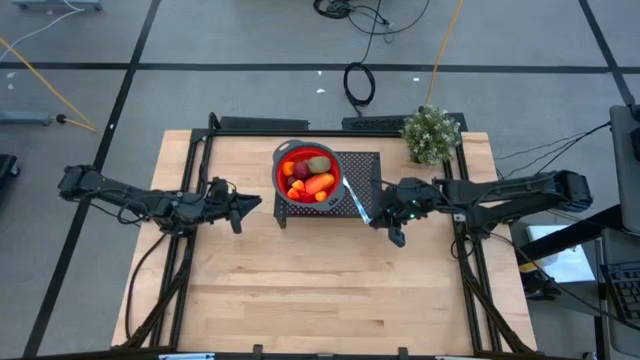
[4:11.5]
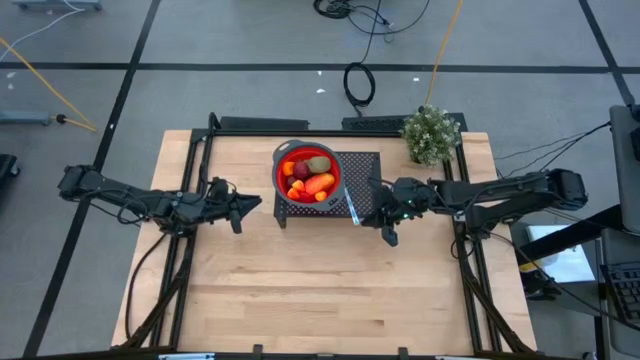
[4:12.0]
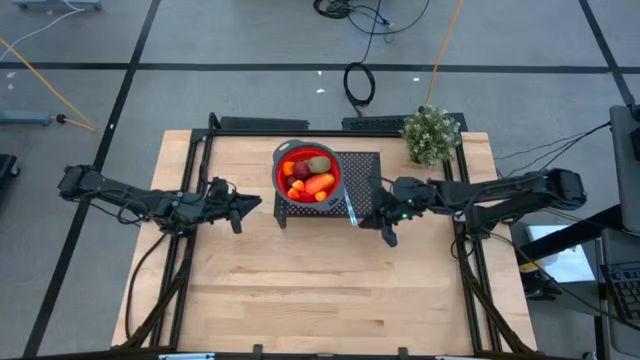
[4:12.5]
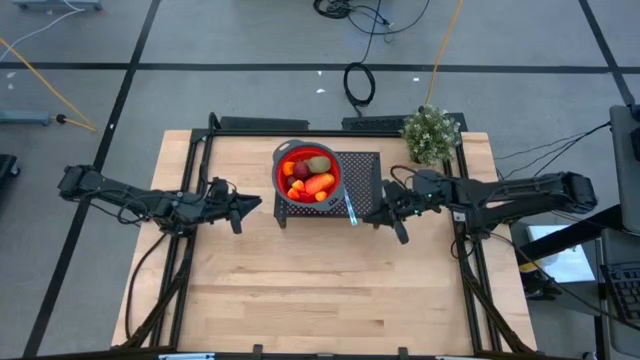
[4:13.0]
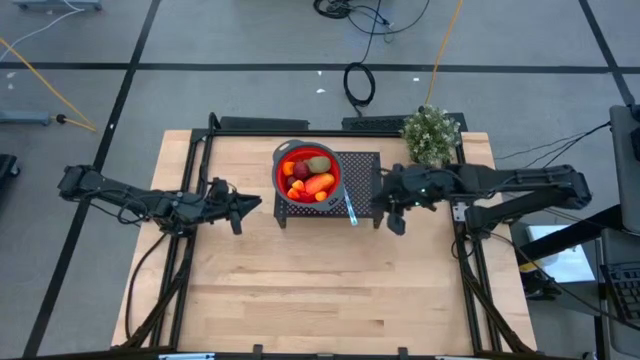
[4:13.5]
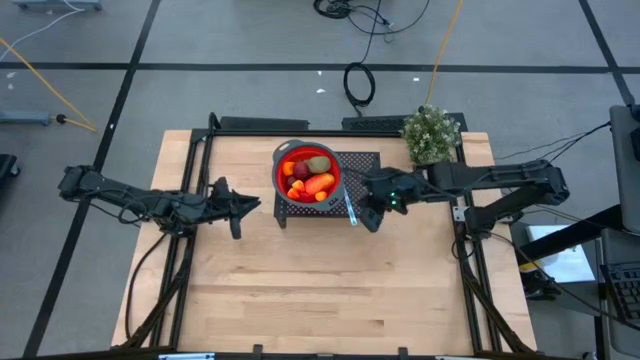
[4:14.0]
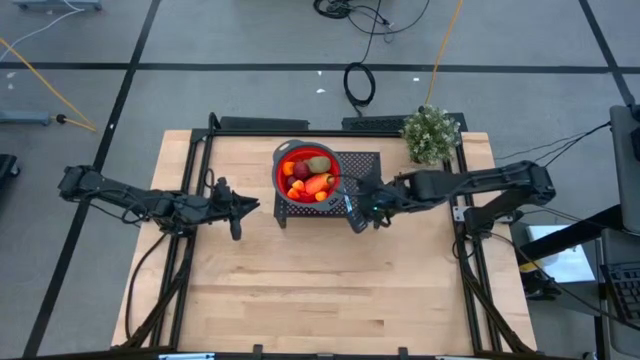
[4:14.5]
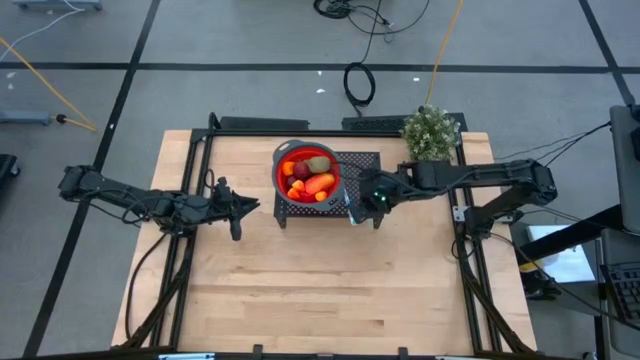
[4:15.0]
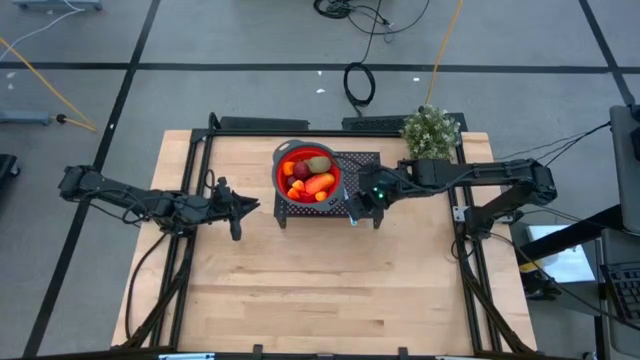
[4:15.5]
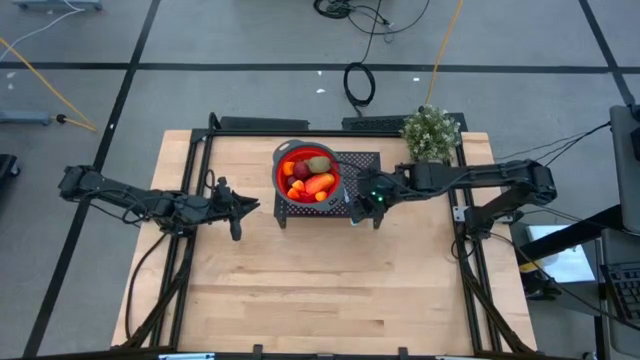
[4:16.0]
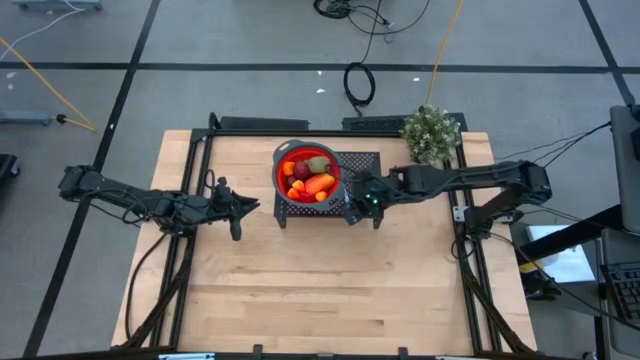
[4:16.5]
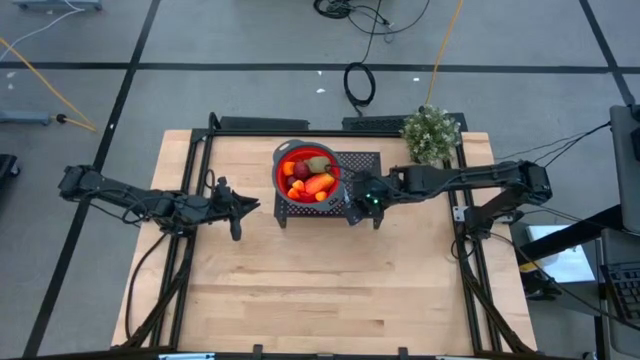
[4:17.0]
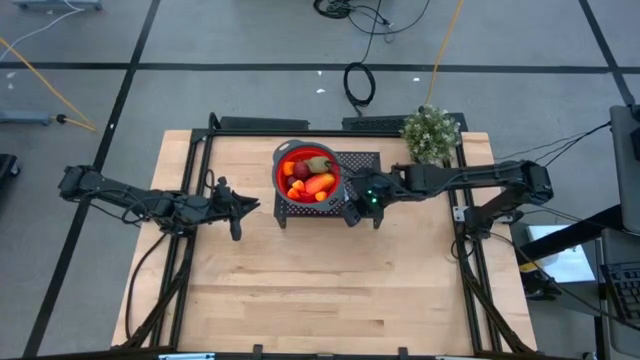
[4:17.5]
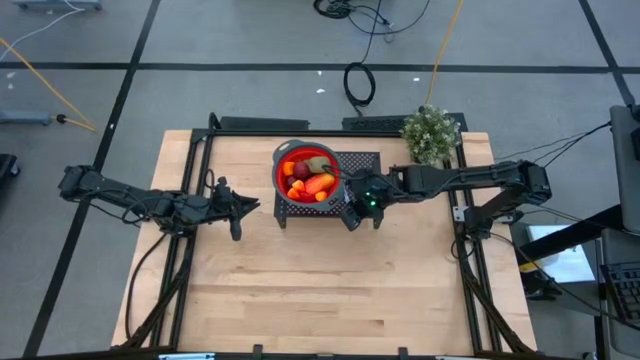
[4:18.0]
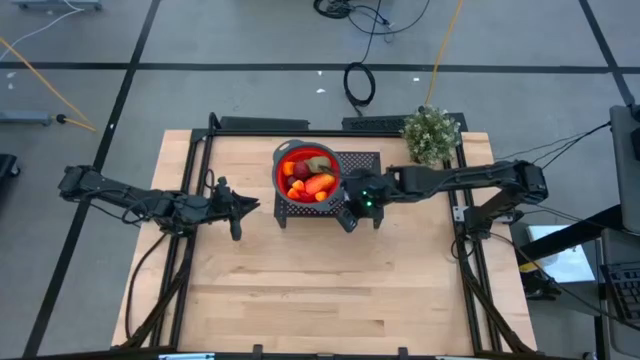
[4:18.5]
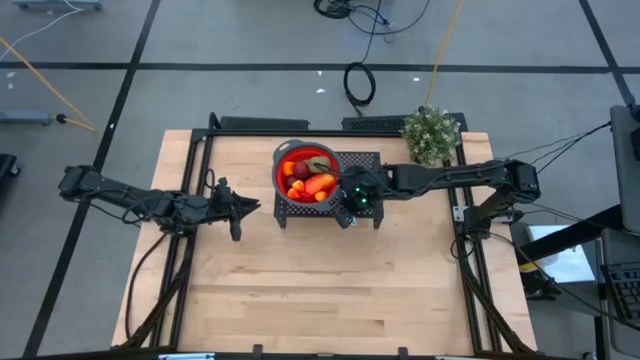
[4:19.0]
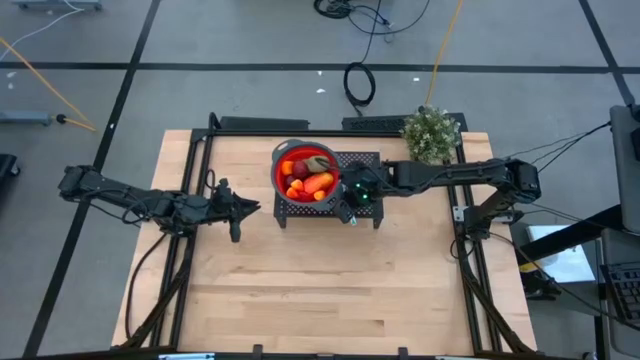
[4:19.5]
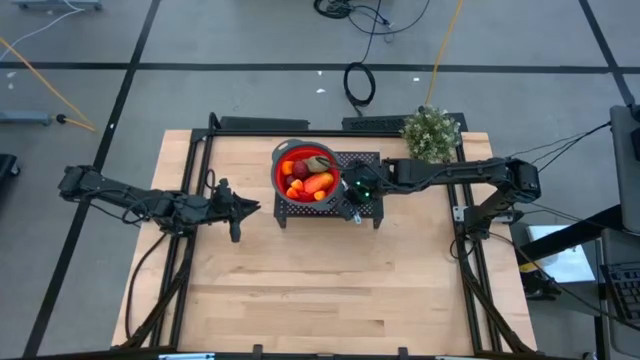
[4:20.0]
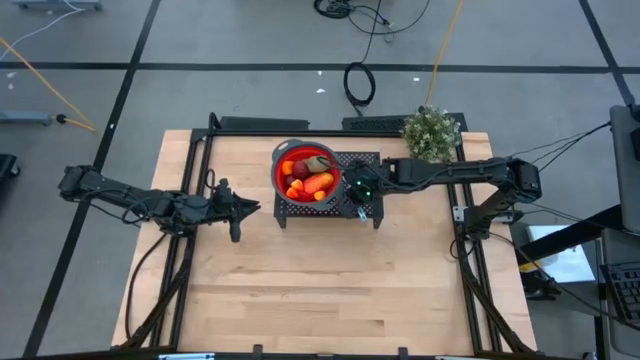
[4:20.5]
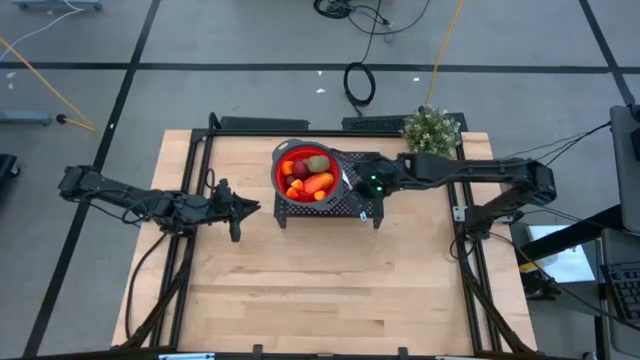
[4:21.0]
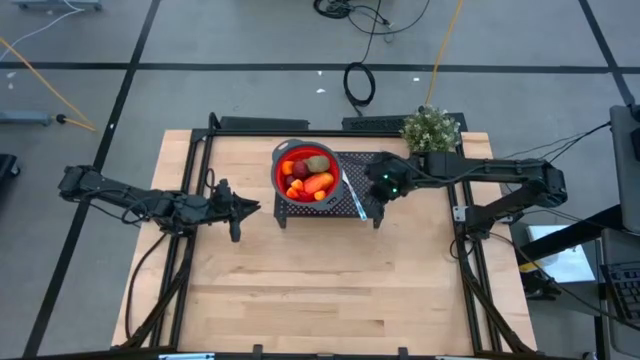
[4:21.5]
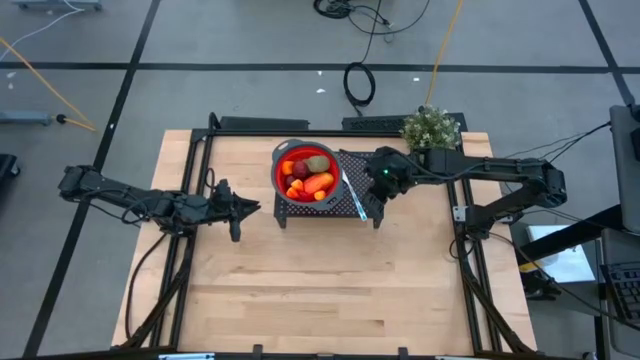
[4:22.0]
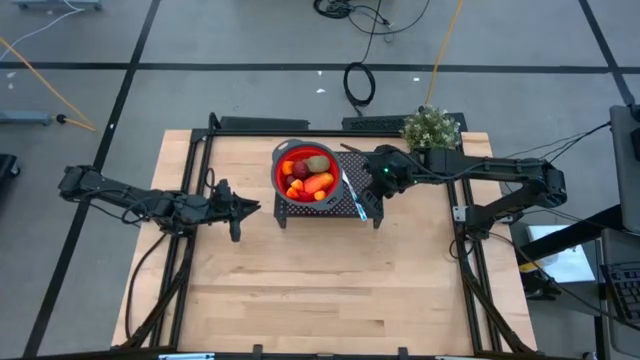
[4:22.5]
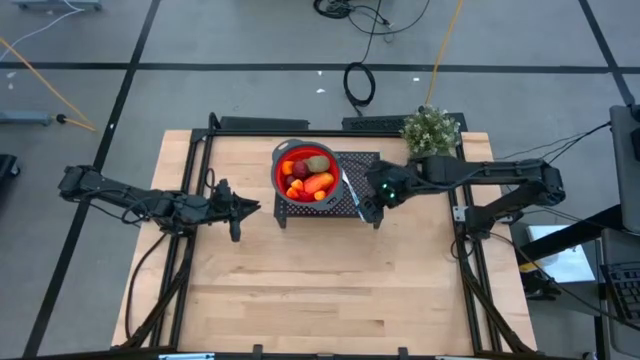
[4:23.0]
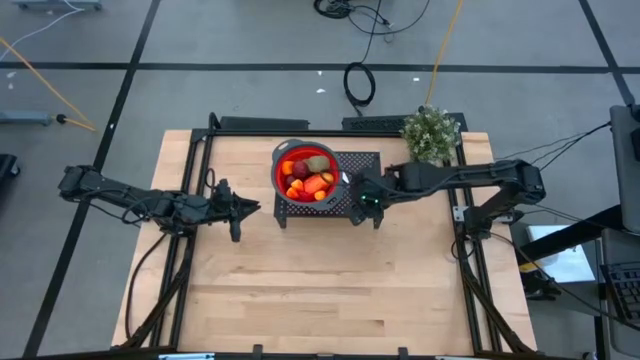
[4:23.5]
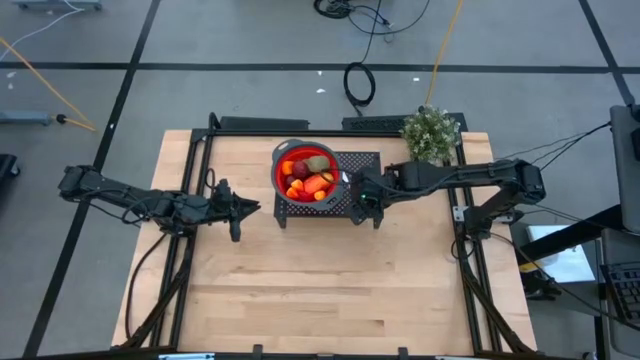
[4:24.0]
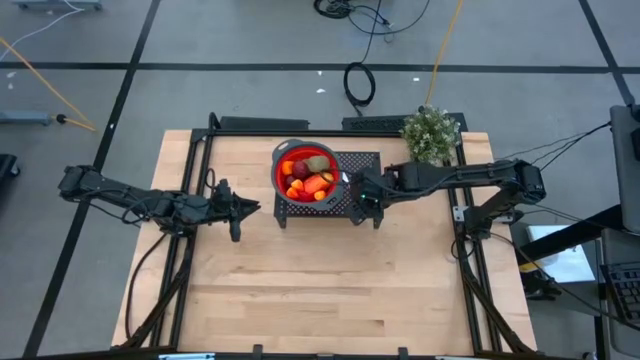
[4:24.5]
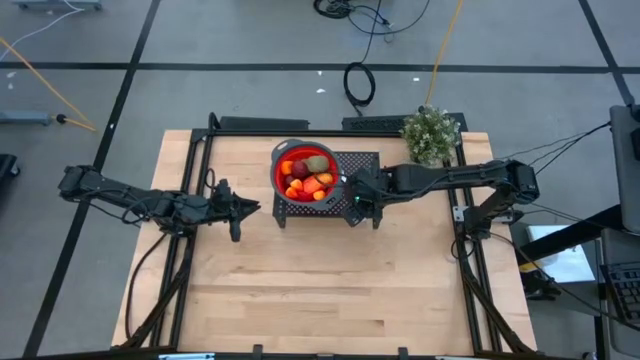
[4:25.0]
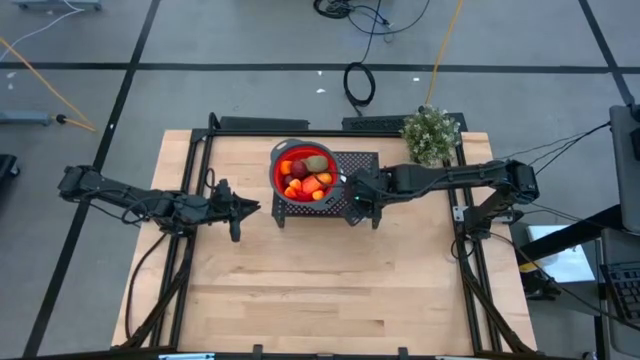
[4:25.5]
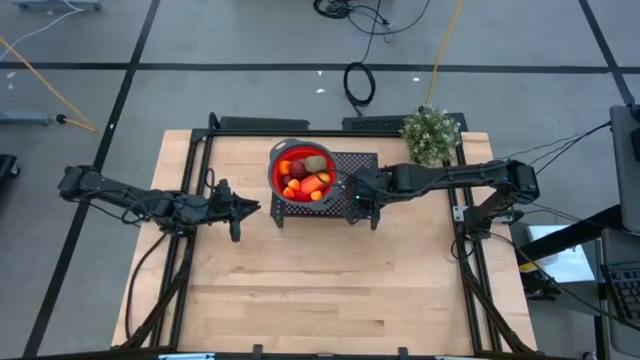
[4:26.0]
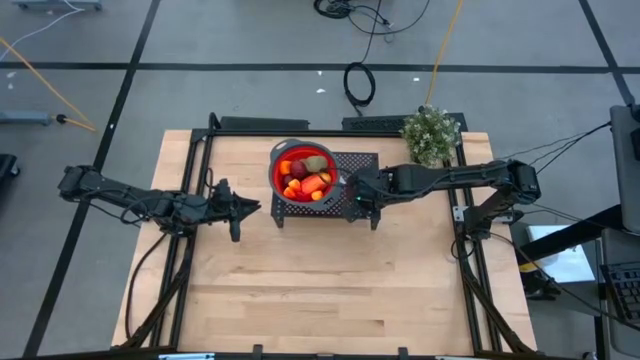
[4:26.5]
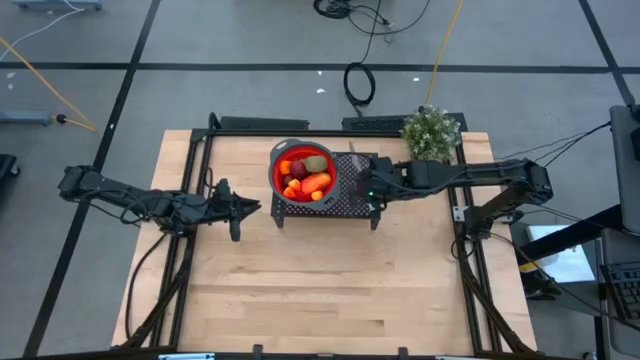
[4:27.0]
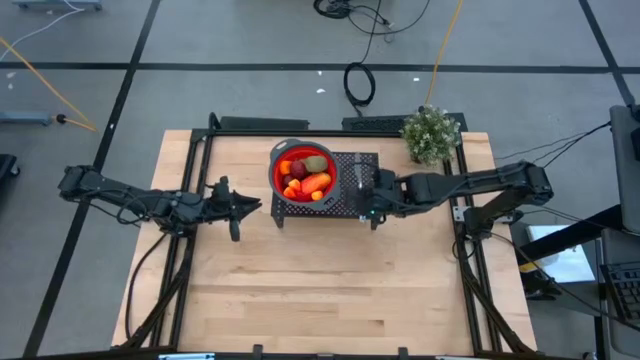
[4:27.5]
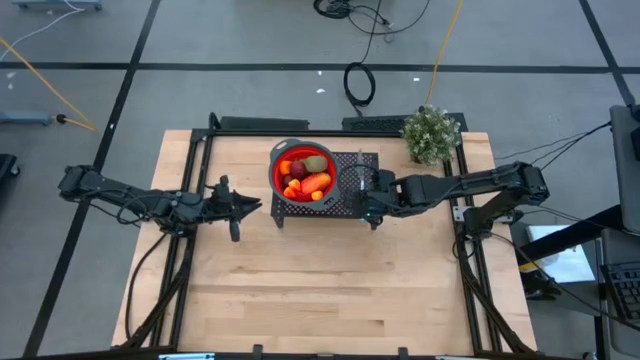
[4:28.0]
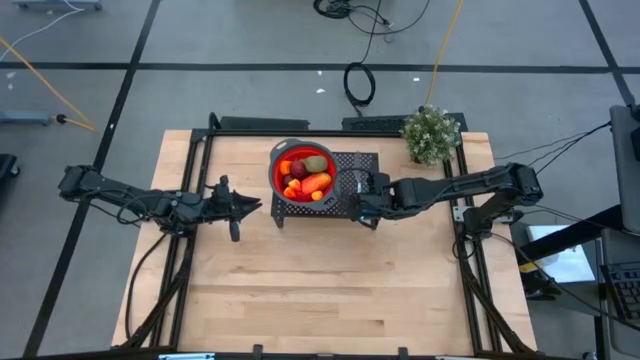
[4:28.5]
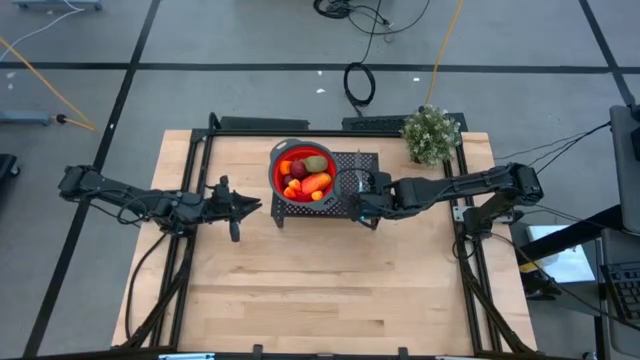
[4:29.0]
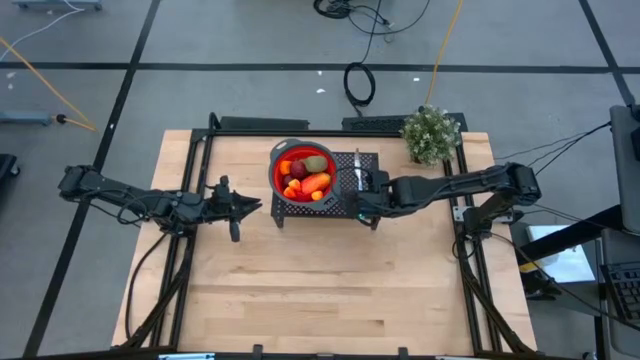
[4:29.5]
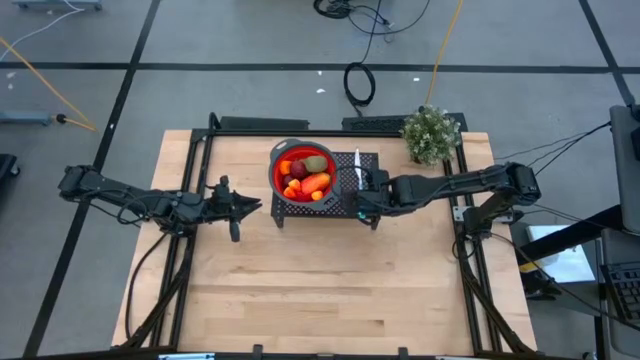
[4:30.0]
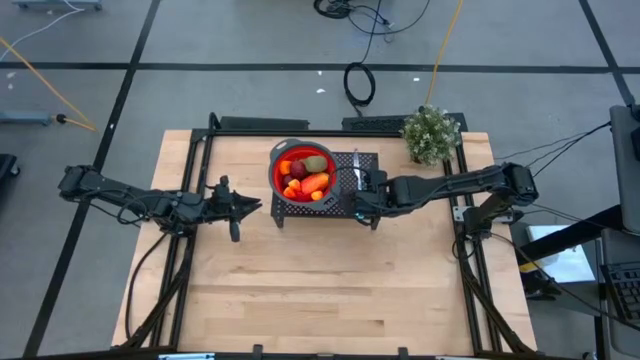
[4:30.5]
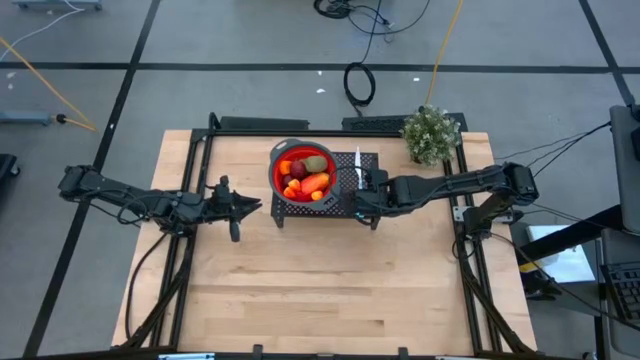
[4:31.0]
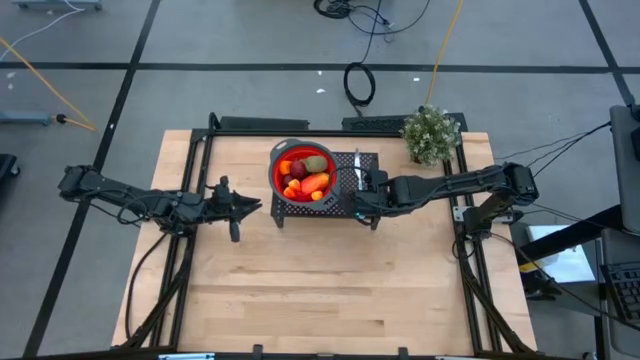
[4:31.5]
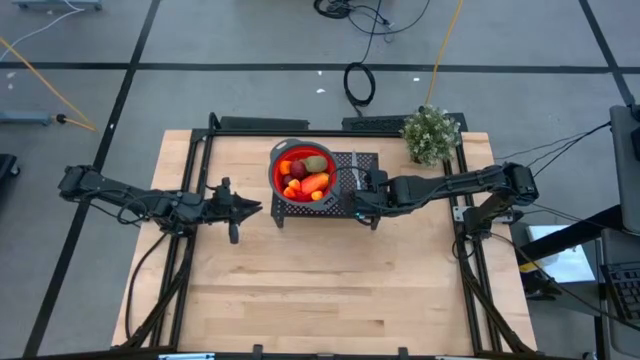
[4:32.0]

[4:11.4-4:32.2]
Task: Pick & Place Fruit
Put the knife on the shelf
